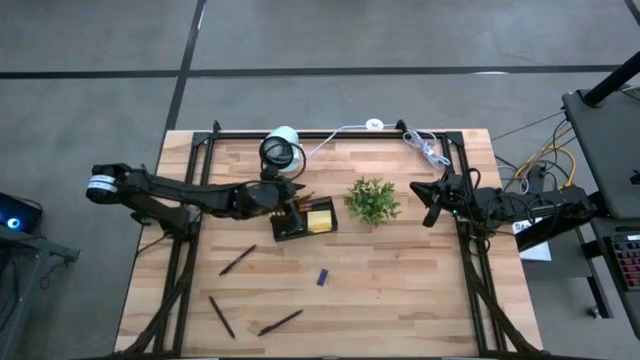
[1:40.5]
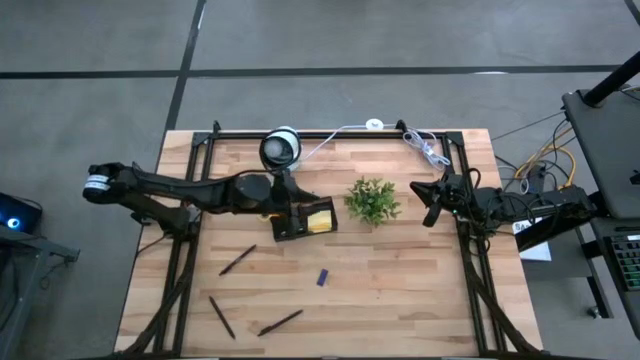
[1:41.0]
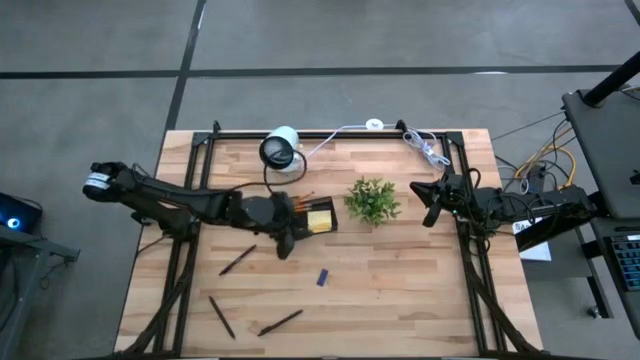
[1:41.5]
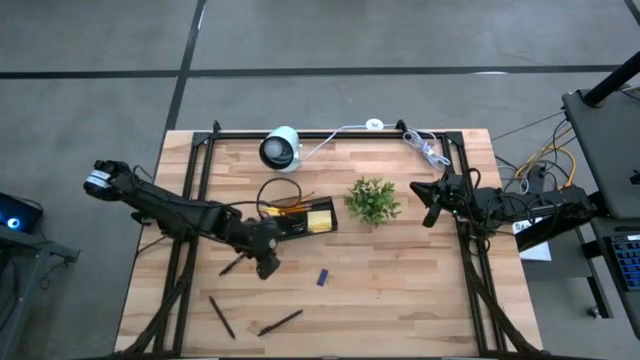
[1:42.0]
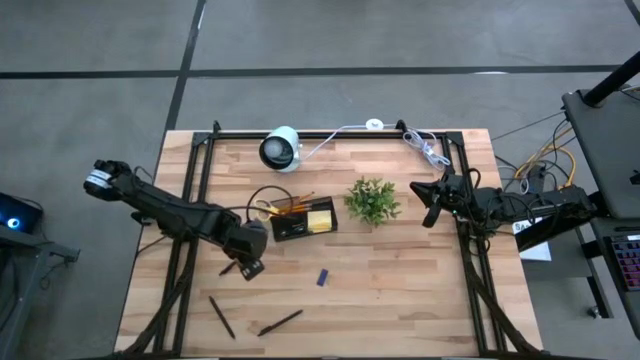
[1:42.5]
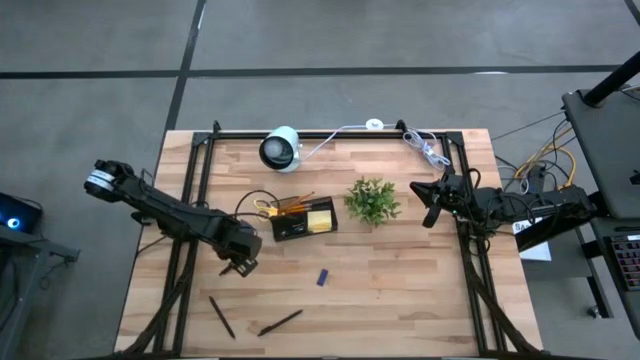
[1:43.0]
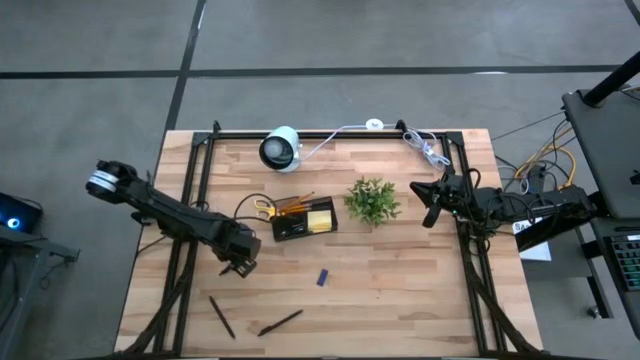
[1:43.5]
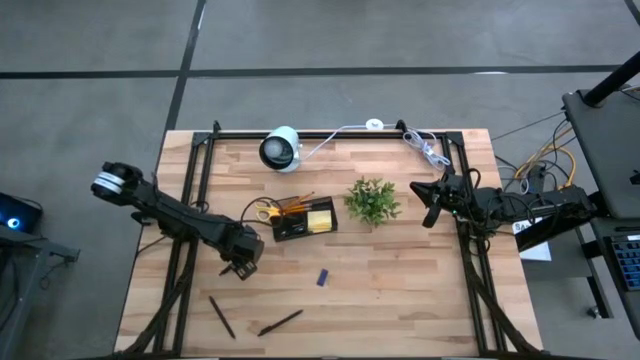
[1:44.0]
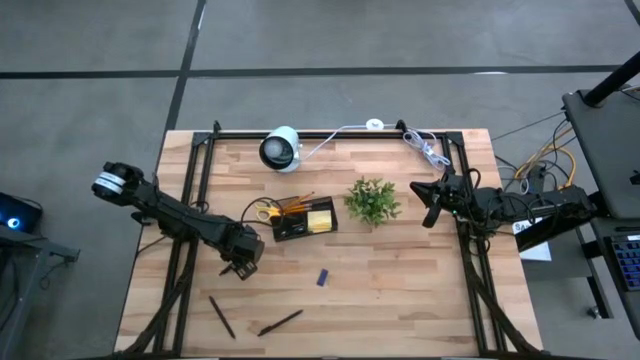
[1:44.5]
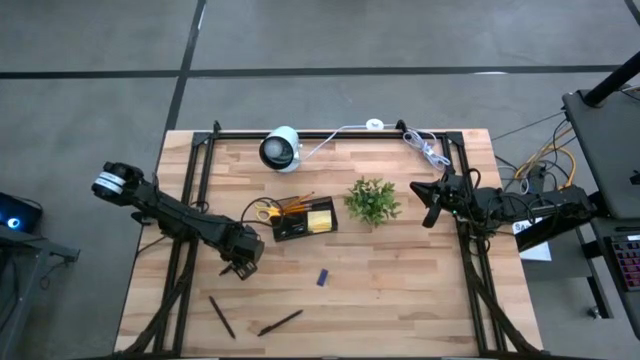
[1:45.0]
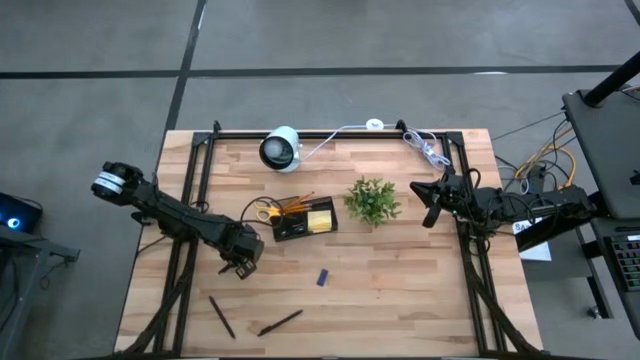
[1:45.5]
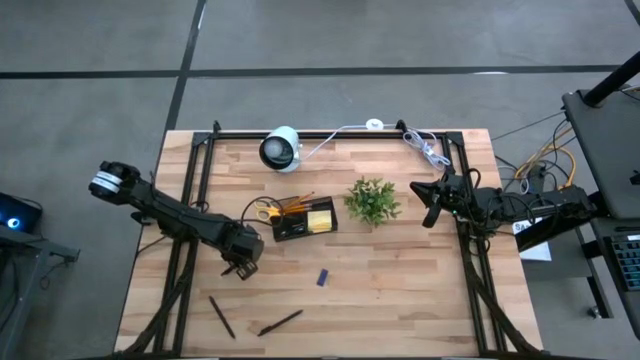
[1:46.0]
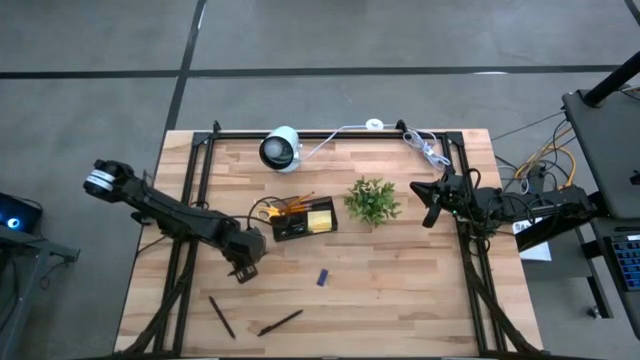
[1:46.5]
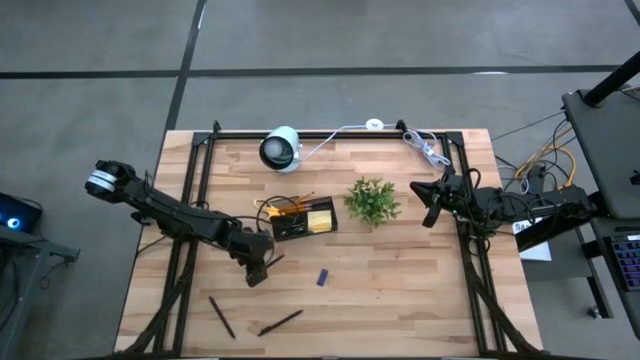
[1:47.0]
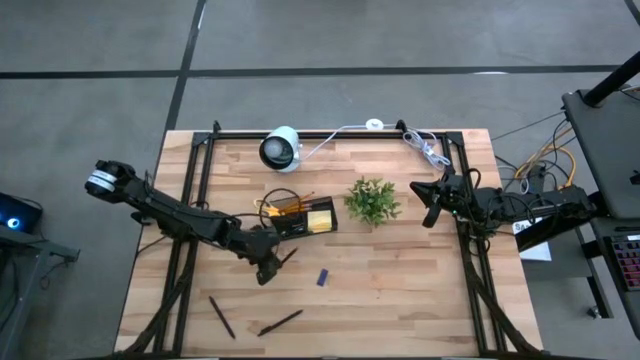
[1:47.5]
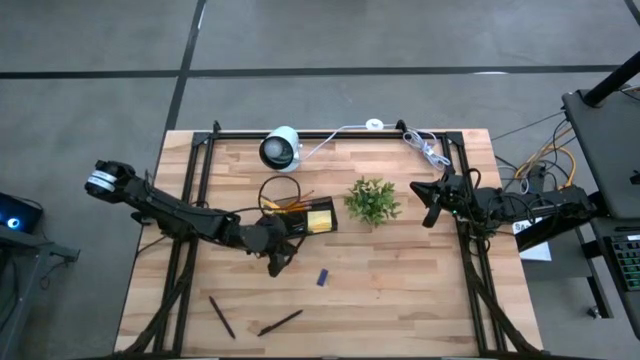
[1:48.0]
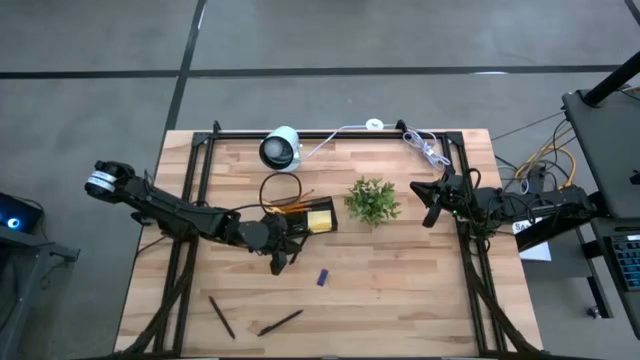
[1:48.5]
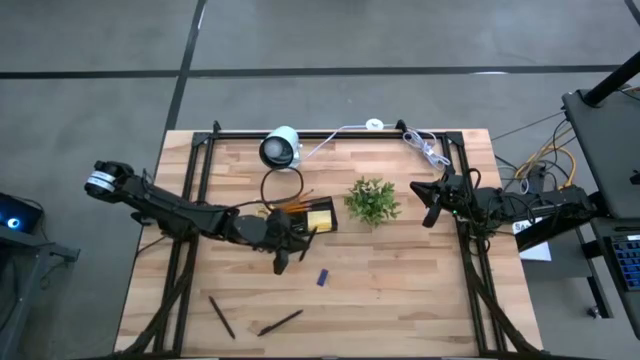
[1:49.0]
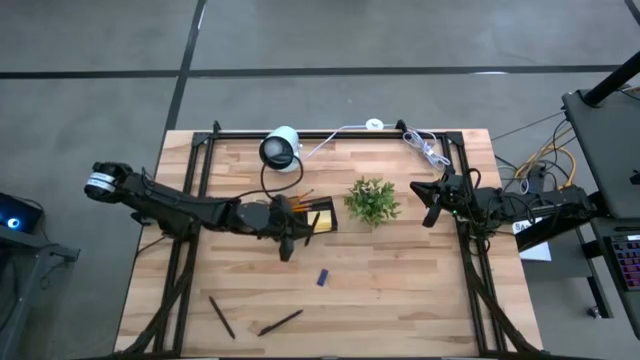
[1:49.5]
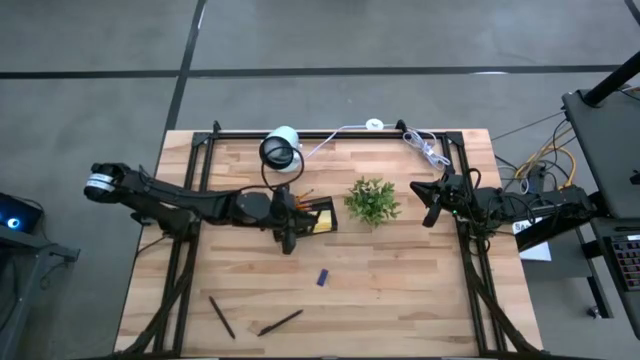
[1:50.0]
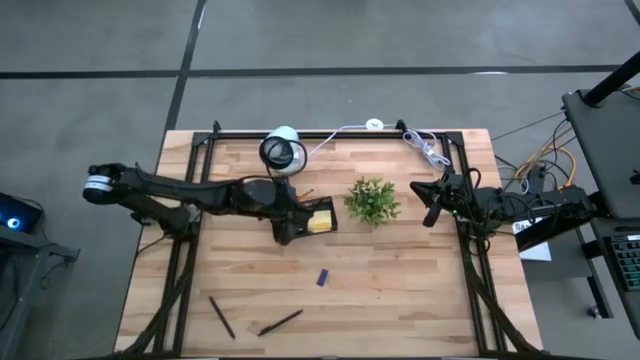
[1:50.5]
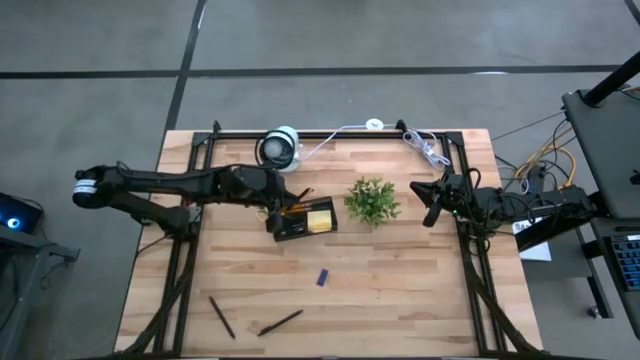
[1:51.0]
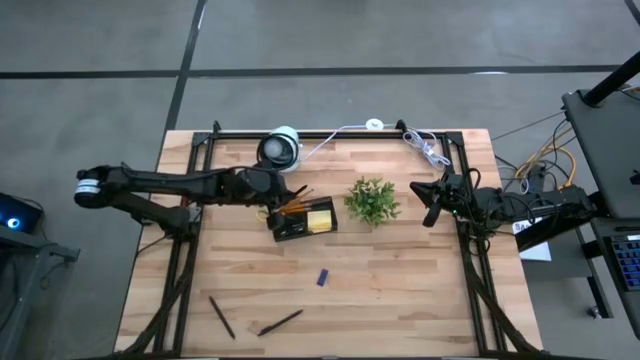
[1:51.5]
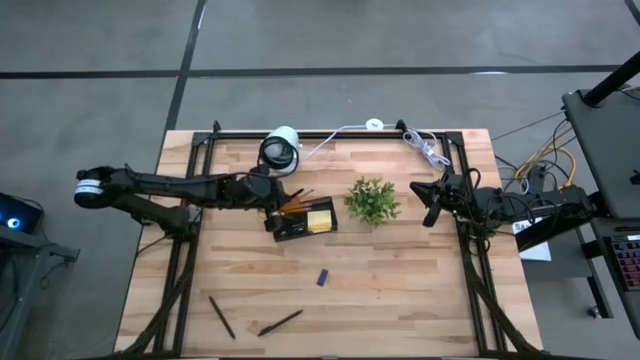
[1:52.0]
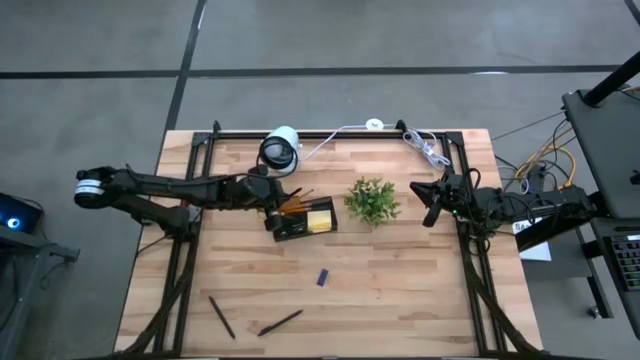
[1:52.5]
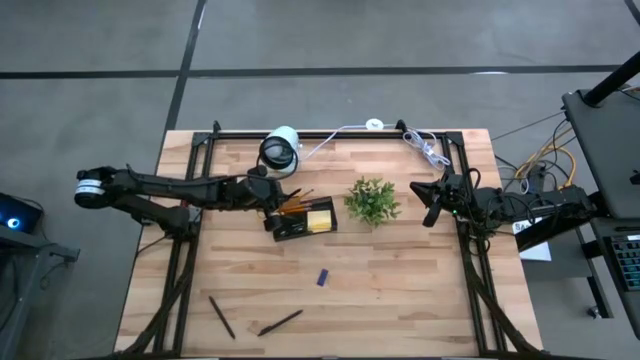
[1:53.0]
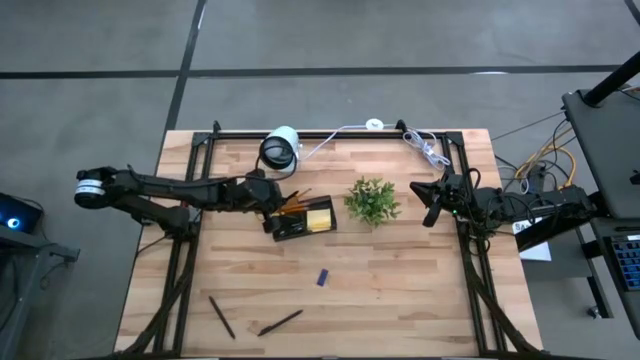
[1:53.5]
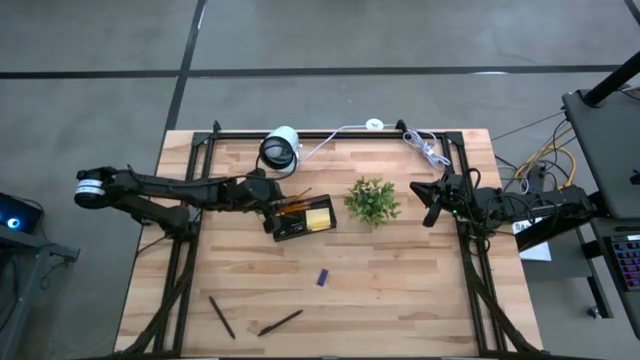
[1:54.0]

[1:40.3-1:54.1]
Task: Pick and place office supplies into organizer
Put the top left black pen in the black desk organizer

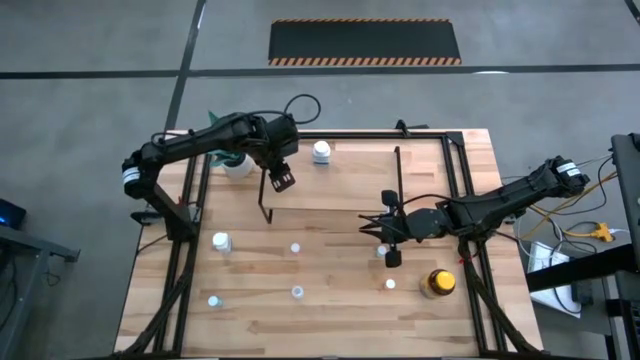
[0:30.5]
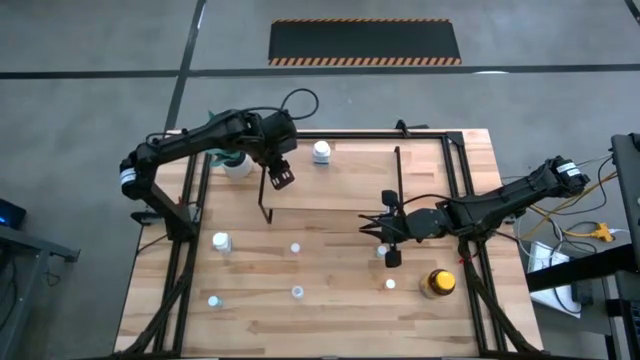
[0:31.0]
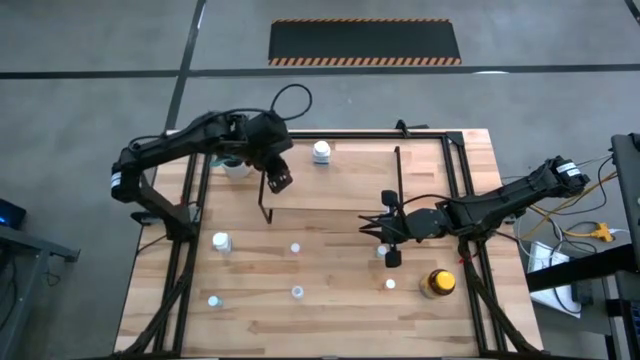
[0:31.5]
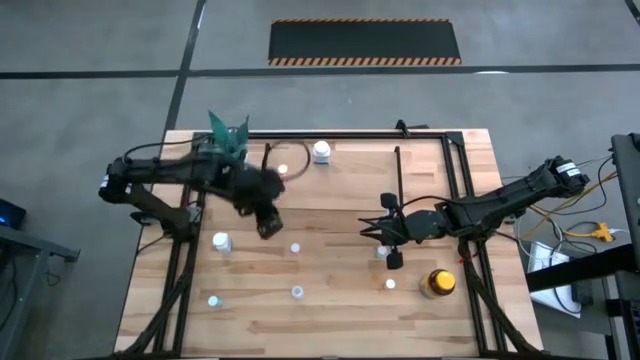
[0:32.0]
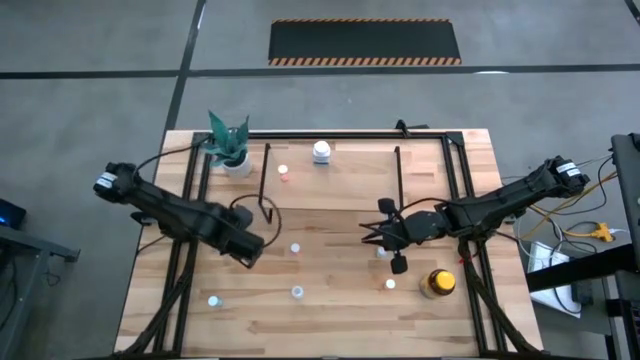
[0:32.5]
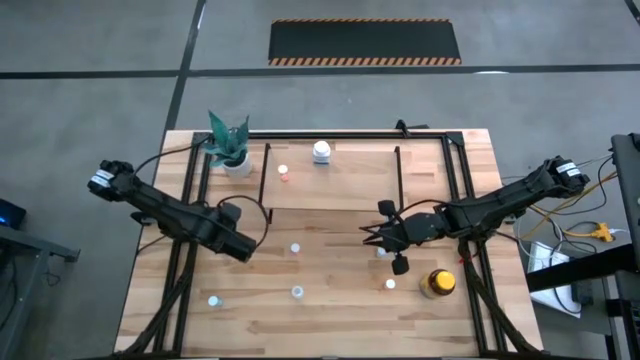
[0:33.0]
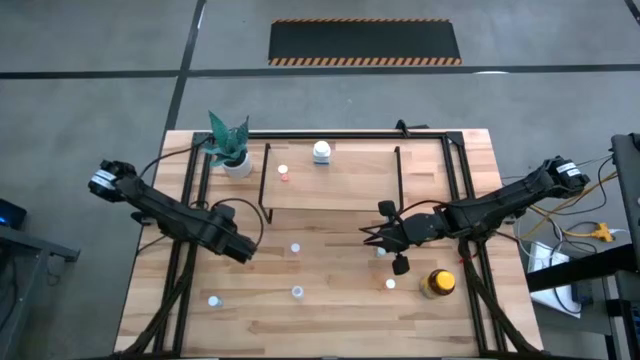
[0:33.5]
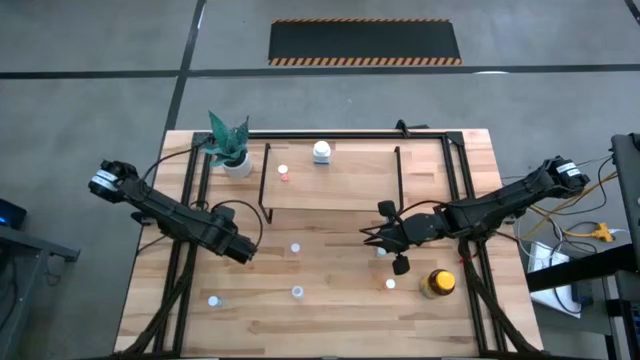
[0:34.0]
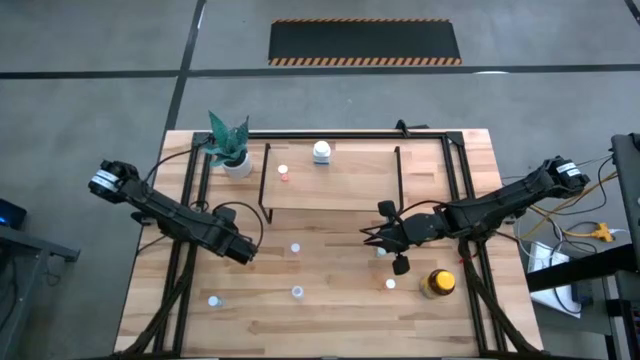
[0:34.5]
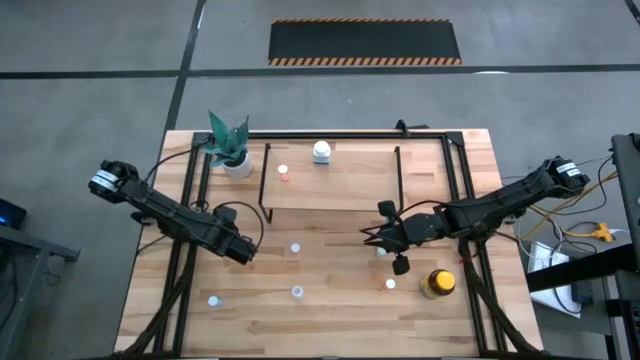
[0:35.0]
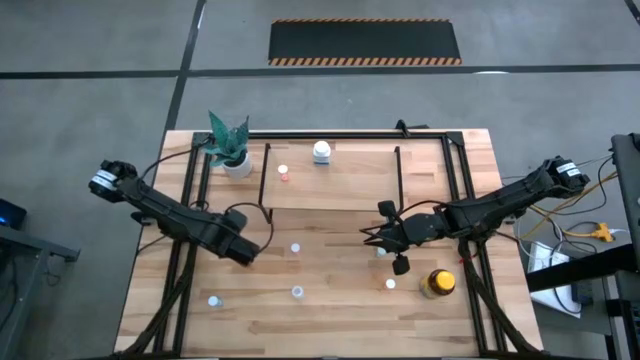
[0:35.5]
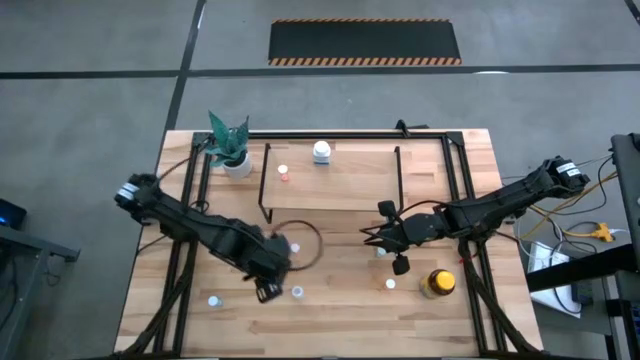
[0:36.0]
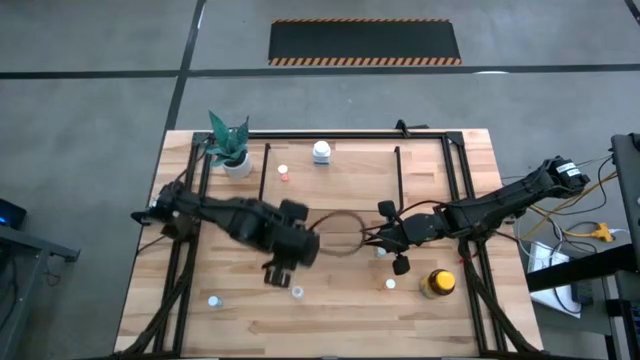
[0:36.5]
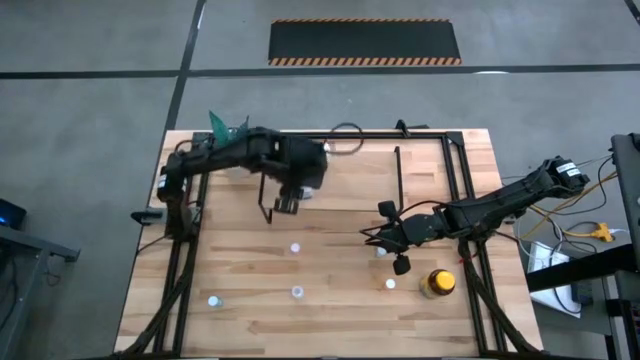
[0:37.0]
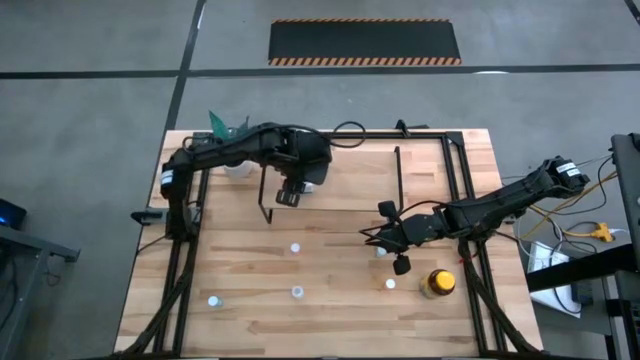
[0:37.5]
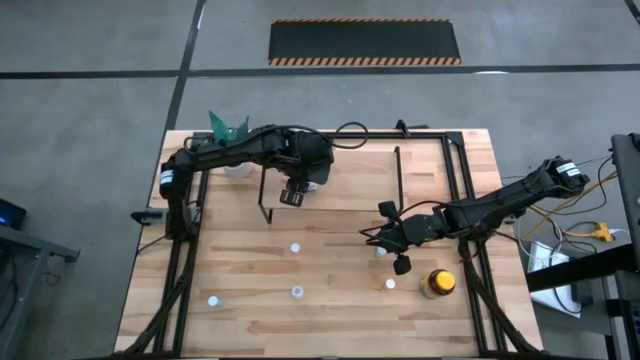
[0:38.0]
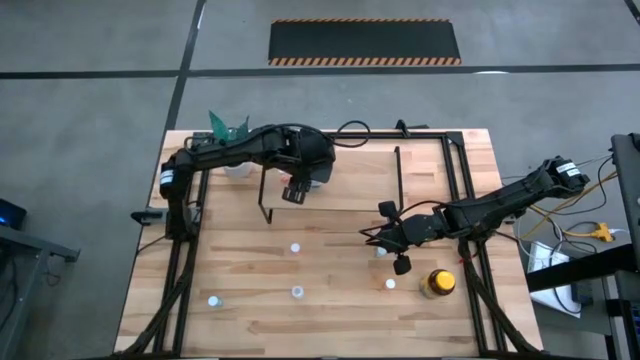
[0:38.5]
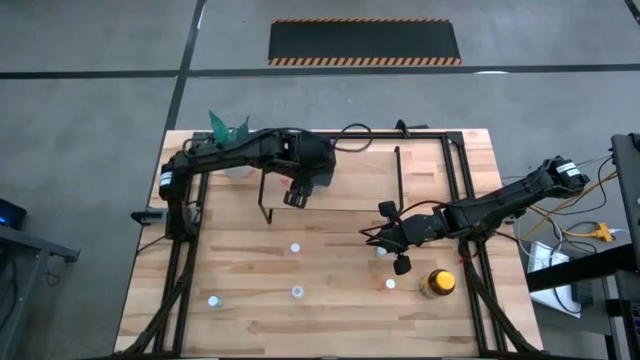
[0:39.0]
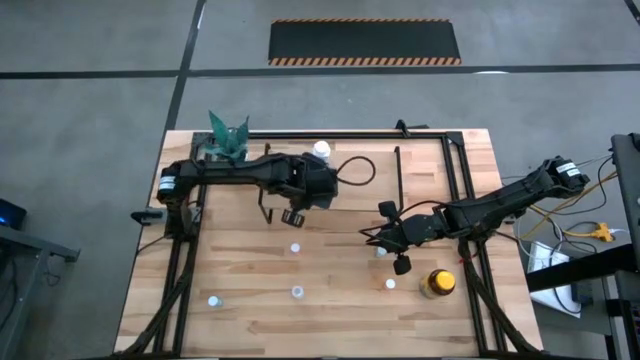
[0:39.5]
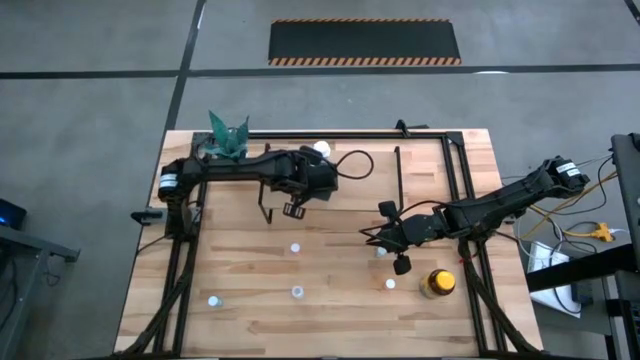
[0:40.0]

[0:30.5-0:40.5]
Task: Pick and place medicine bottles onto shelf by color
Put the white medicine bottle on the shelf
